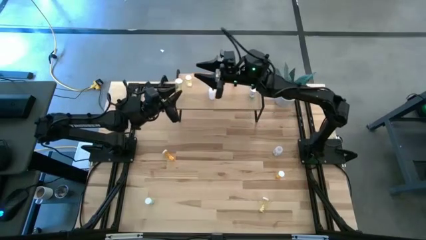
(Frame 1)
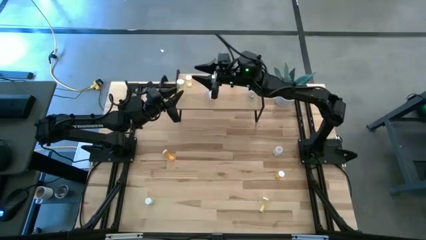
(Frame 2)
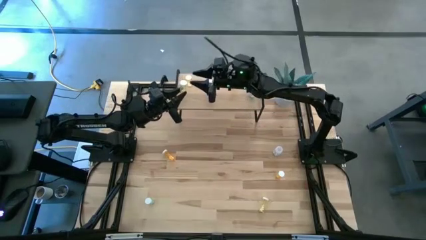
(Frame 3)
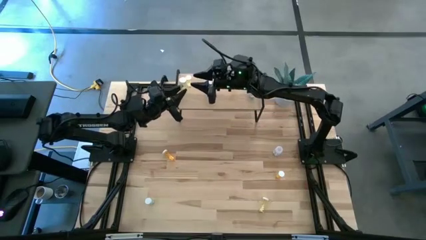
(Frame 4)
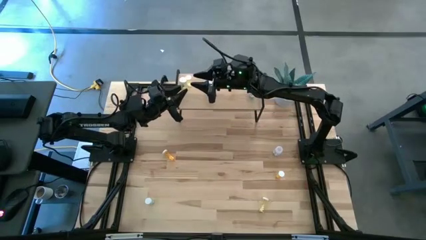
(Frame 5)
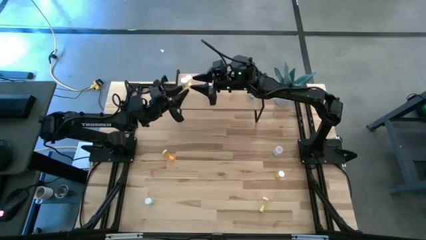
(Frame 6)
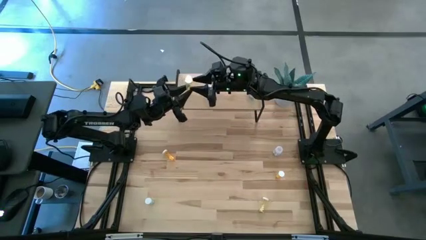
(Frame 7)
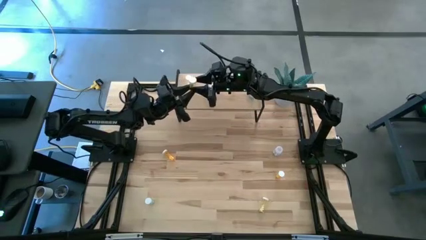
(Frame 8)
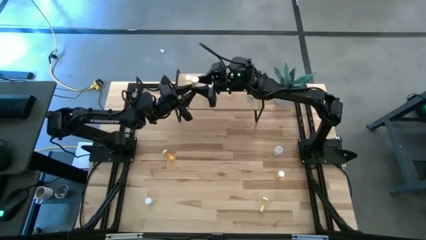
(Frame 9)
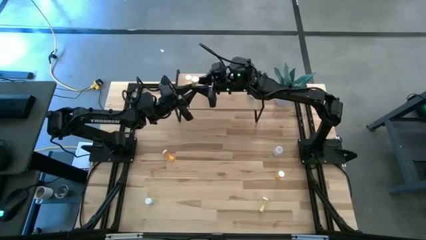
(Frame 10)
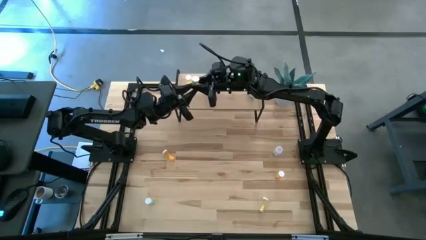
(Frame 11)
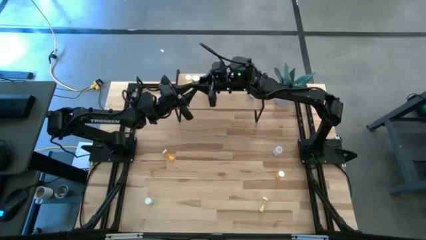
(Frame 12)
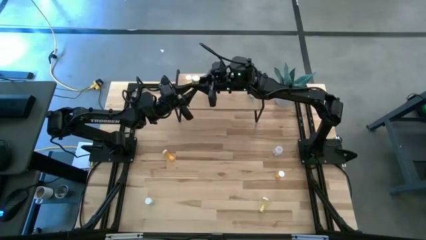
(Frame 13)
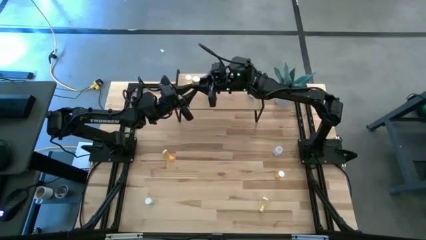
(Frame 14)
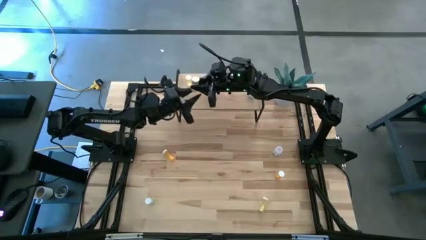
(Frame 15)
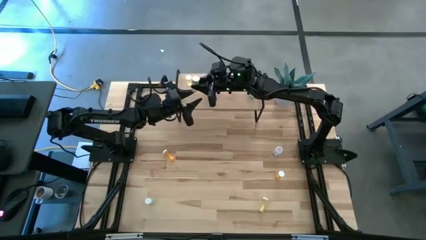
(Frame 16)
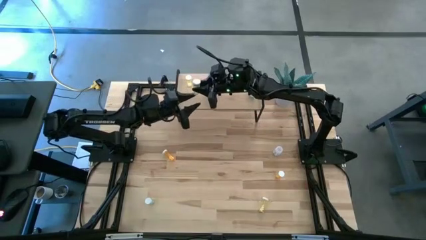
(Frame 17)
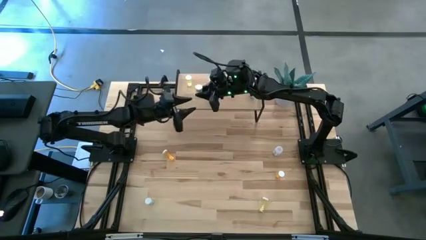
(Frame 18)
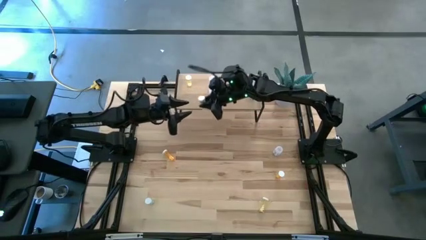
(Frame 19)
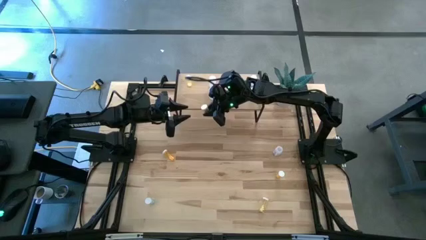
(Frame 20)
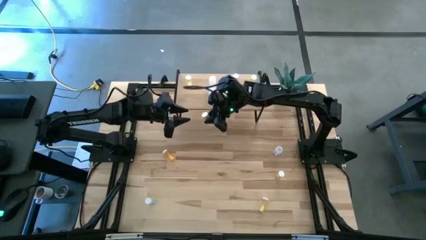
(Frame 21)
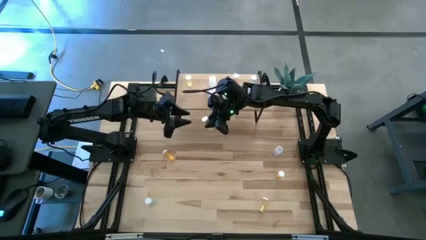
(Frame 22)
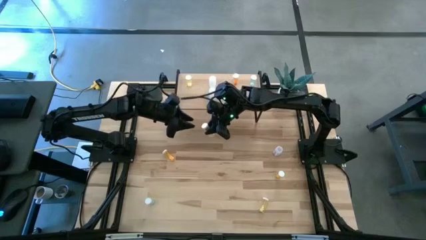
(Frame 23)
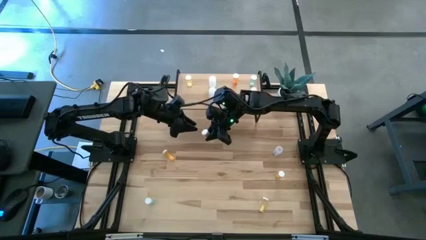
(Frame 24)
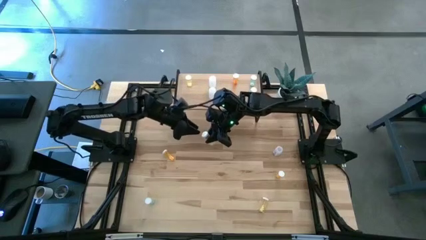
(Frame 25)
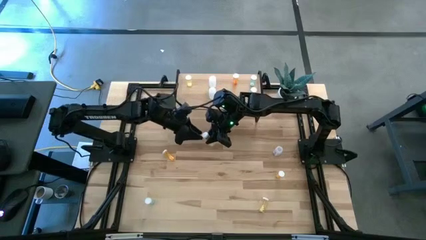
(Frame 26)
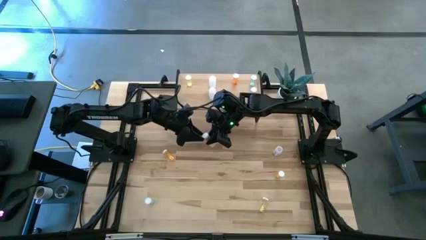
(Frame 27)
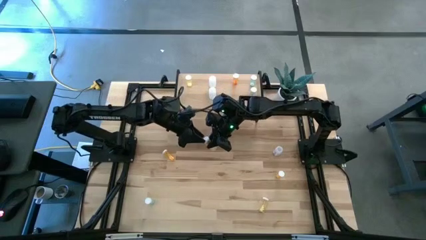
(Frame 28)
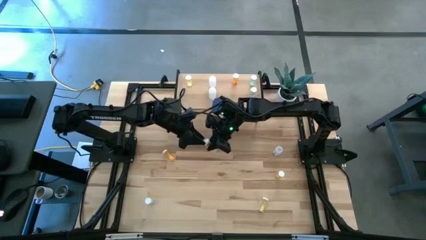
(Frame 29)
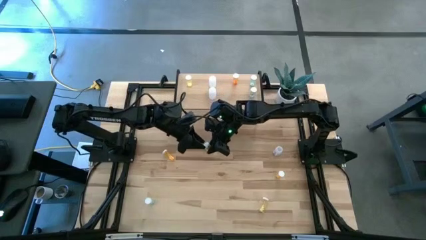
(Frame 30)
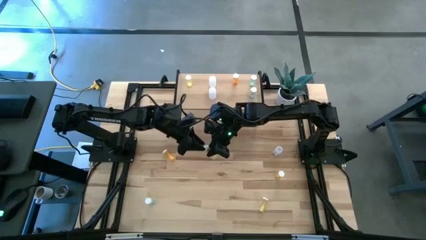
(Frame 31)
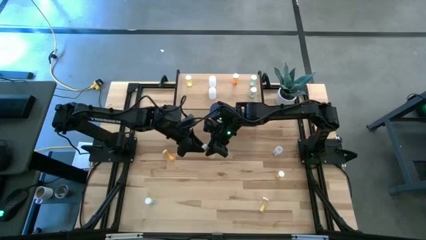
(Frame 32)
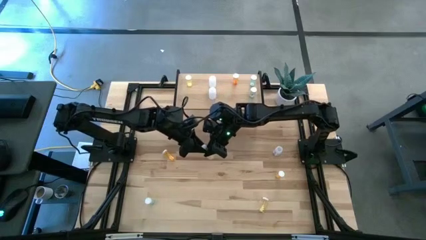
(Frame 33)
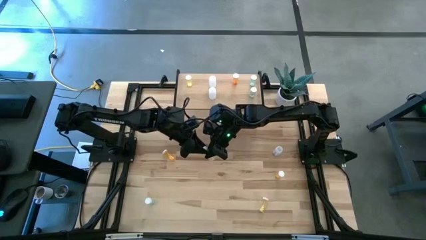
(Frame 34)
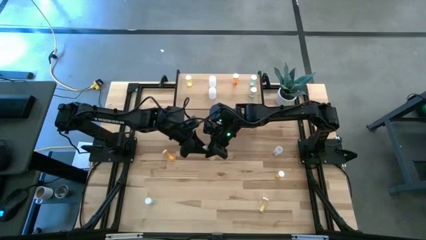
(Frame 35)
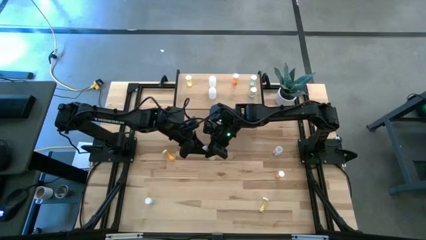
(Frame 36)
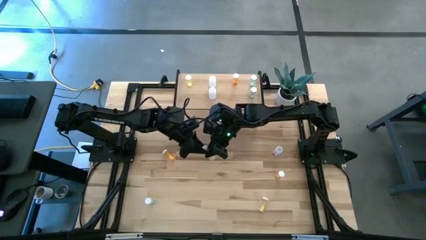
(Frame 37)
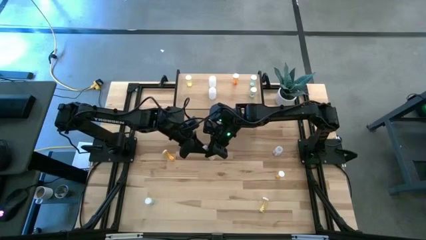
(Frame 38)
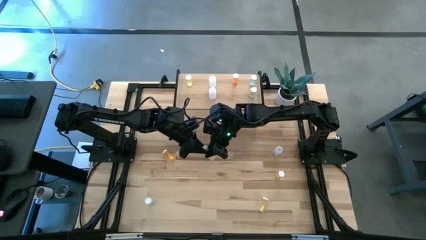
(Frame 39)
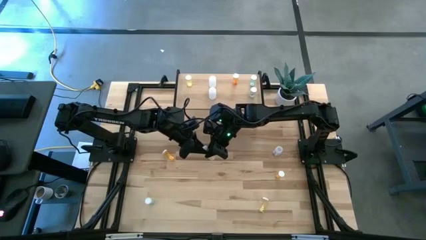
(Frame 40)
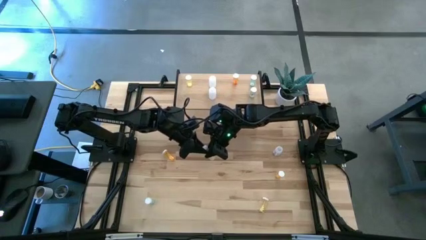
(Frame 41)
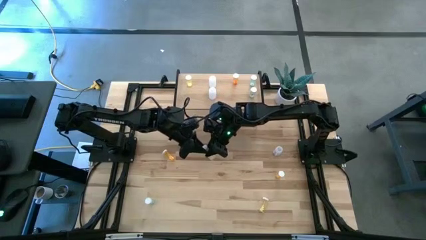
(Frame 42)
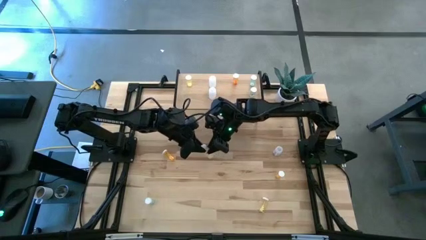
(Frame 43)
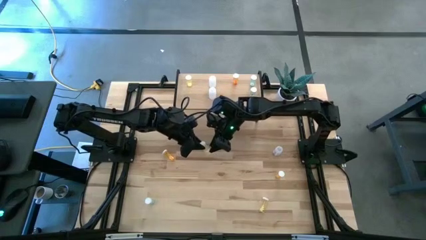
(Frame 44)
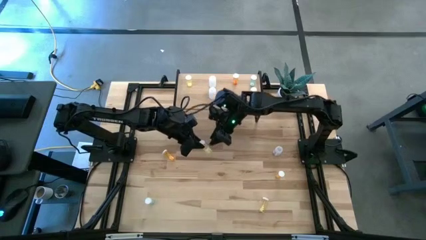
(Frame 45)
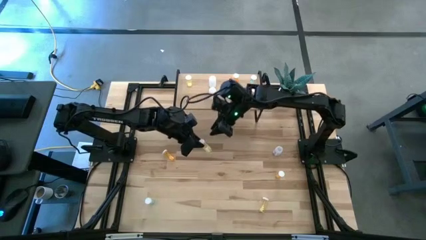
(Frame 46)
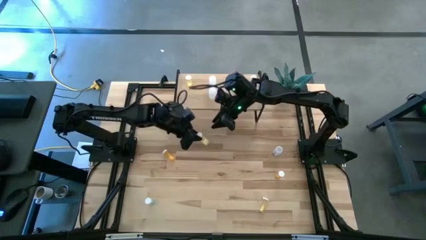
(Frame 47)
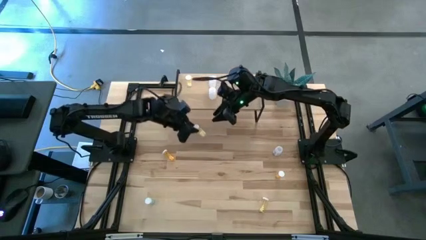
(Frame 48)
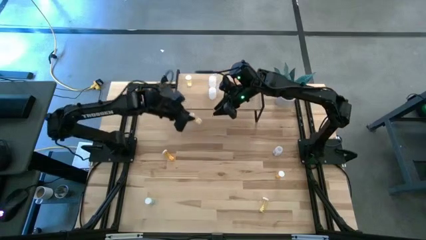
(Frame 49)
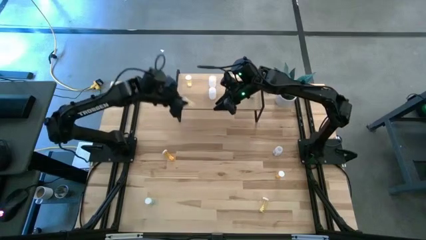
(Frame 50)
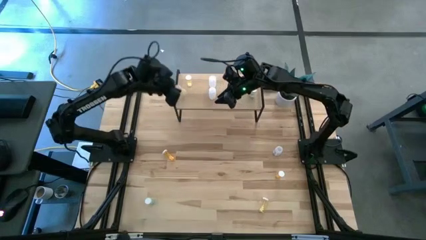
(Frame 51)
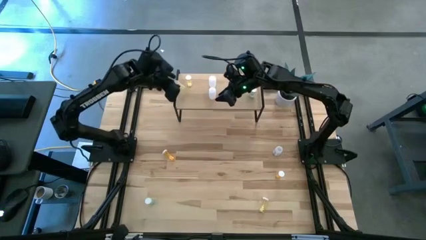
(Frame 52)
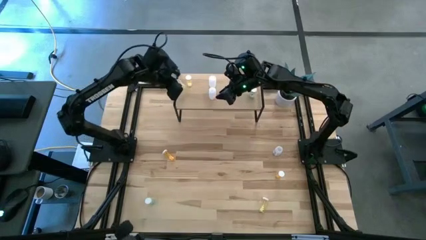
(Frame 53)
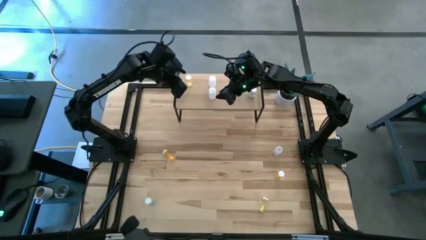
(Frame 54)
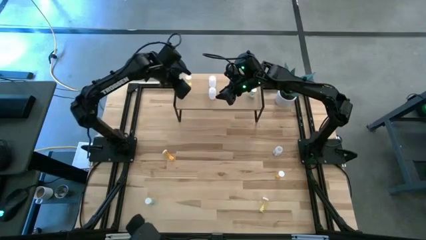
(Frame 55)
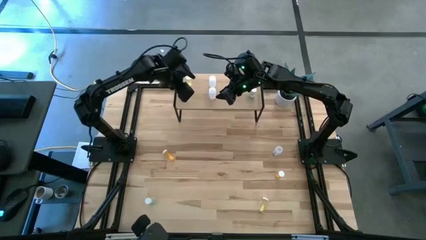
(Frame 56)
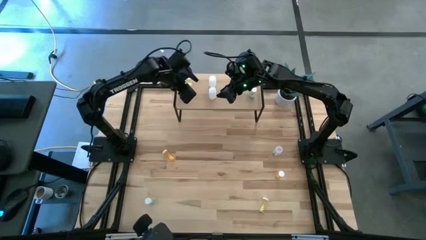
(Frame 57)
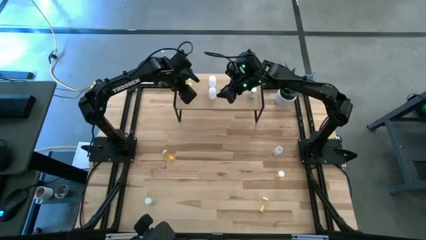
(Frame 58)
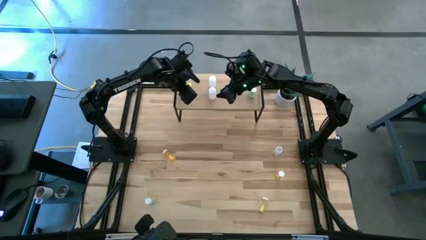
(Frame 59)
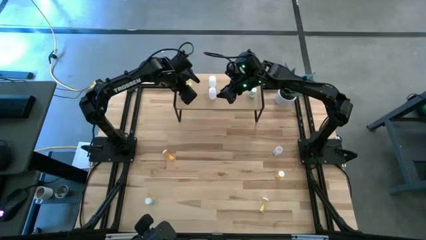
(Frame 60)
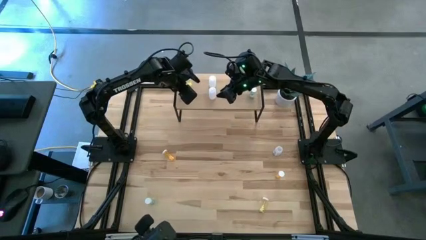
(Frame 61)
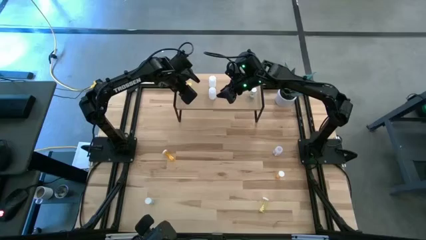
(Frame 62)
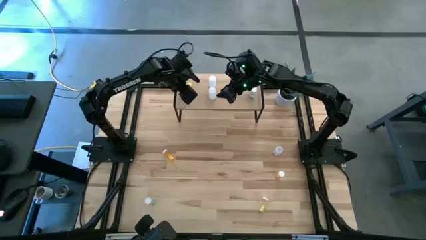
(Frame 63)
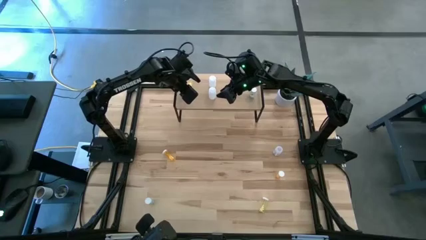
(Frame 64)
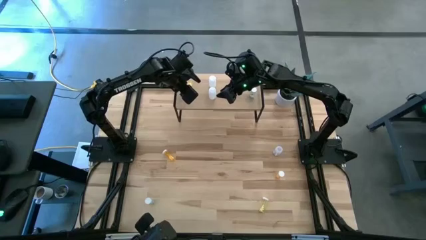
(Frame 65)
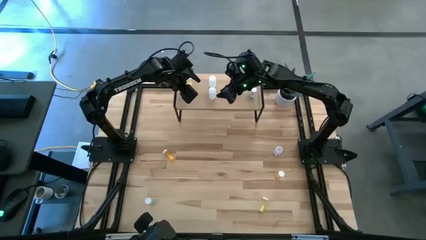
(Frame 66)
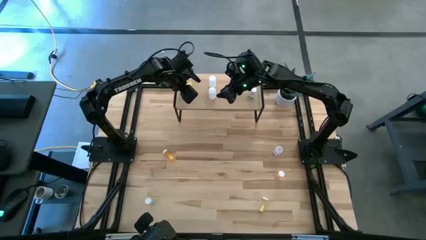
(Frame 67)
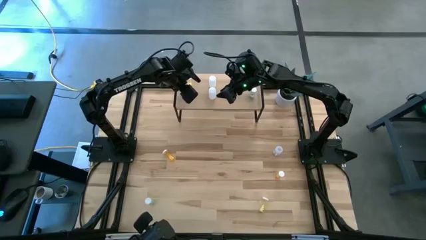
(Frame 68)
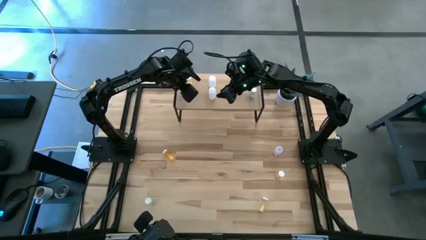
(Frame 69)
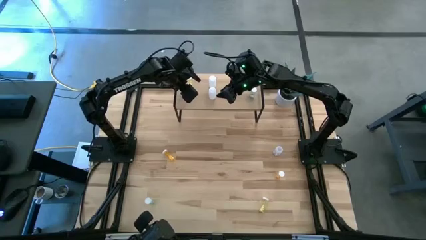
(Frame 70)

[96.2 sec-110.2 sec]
Task: Pick and place medicine bottles onto shelf by color
Put the right yellow medicine bottle on the shelf aligned with the other yellow medicine bottle

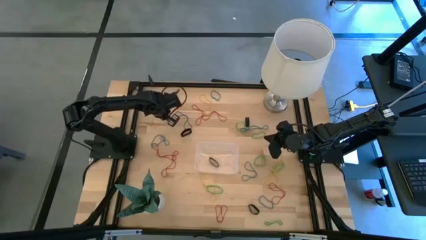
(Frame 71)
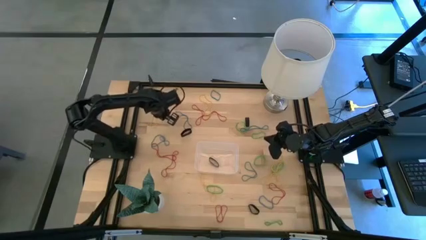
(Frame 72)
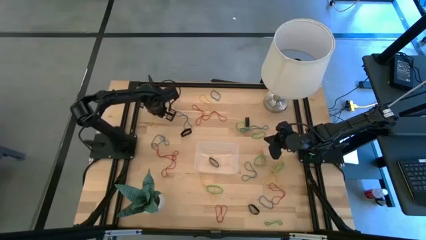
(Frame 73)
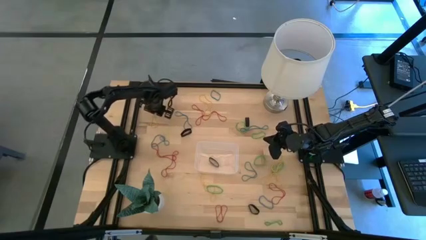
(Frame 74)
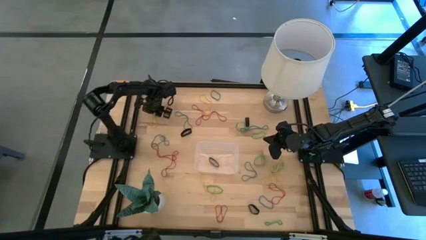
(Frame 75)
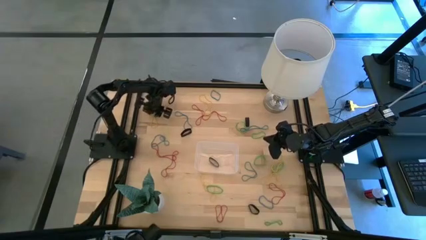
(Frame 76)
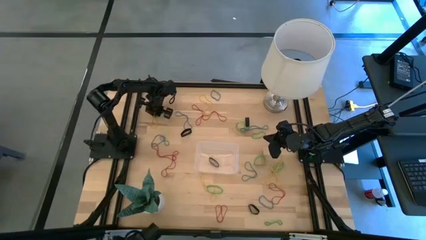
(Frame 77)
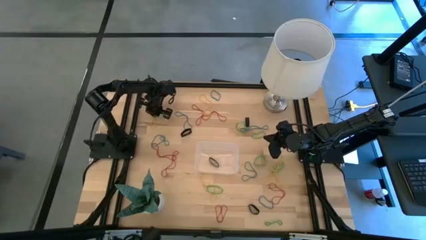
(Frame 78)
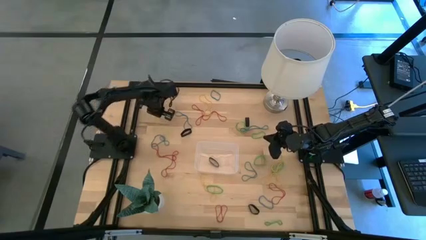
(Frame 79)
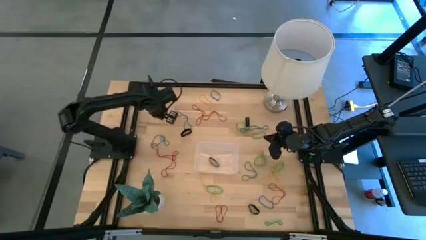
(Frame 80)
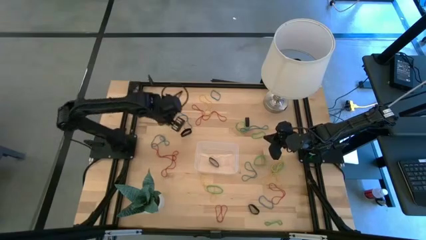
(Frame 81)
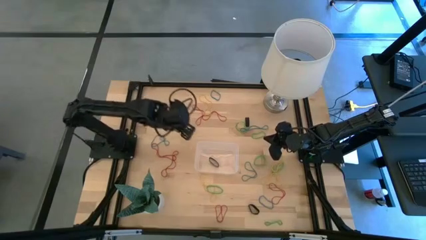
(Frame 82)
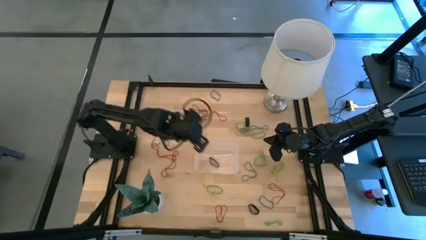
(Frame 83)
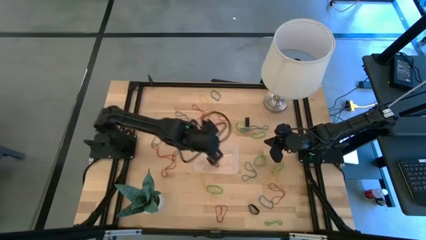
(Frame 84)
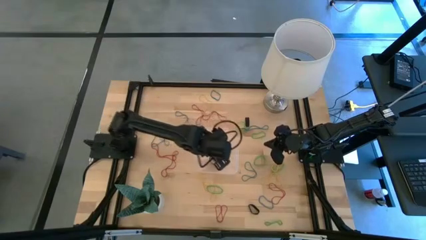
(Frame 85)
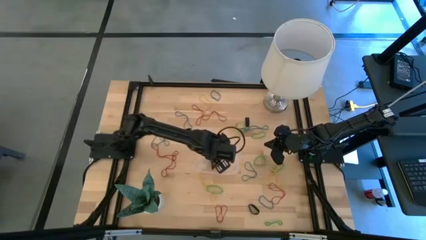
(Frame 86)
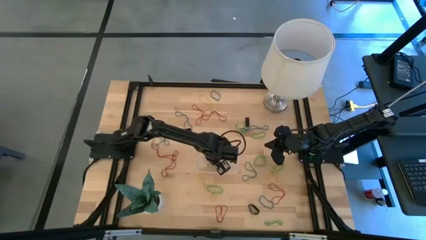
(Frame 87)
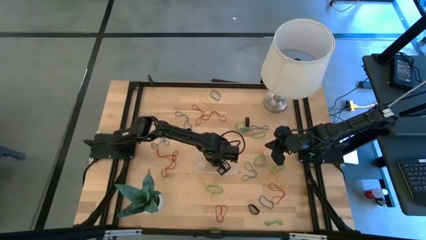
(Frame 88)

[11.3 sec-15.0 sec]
Task: Pick and place rubber bands into bin
Put the yellow rubber band into the transparent bin
